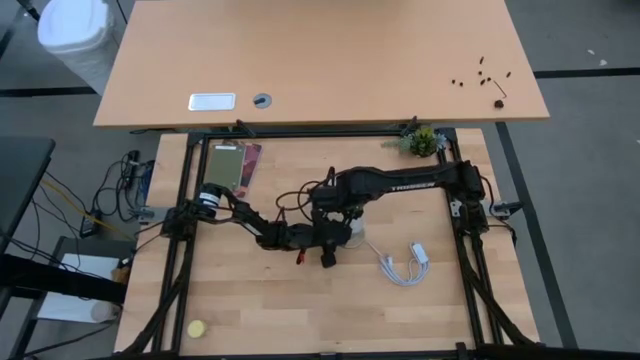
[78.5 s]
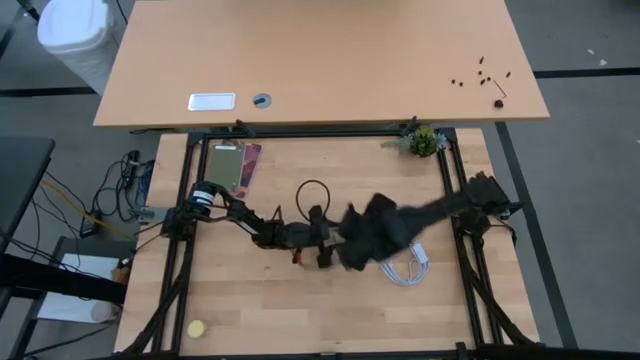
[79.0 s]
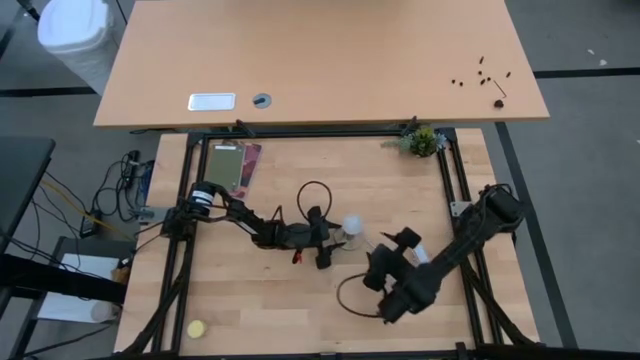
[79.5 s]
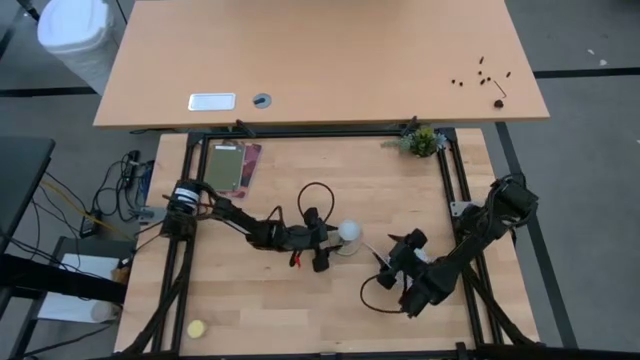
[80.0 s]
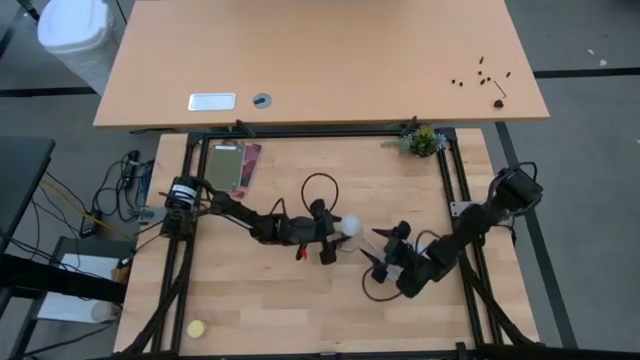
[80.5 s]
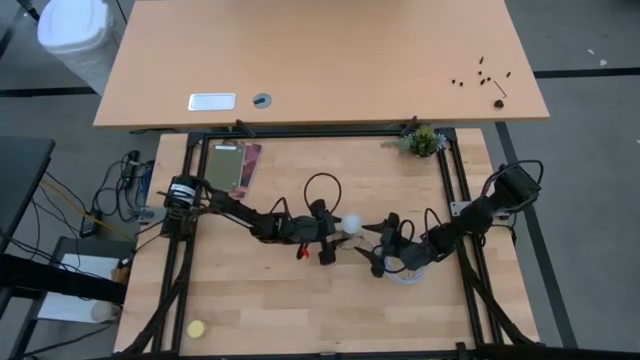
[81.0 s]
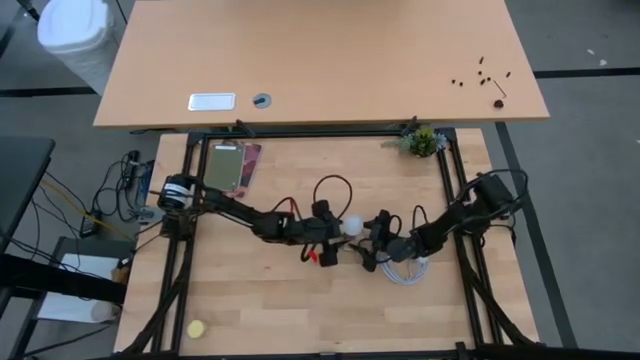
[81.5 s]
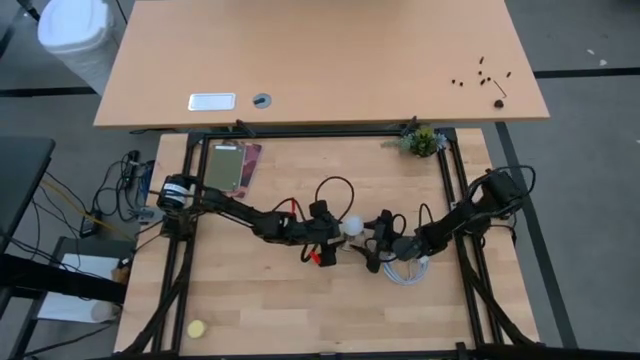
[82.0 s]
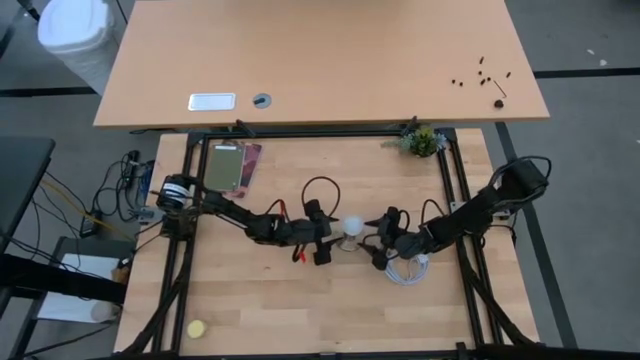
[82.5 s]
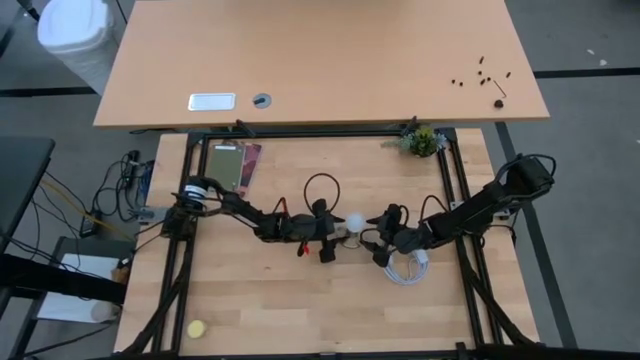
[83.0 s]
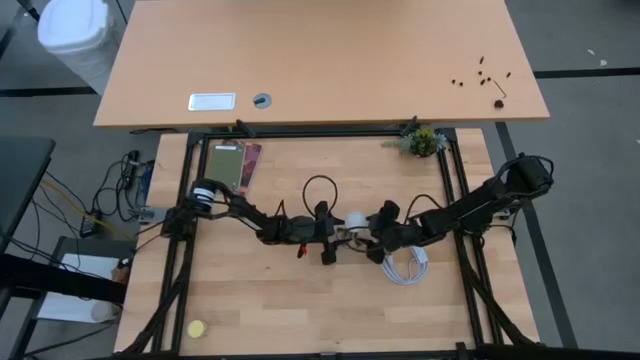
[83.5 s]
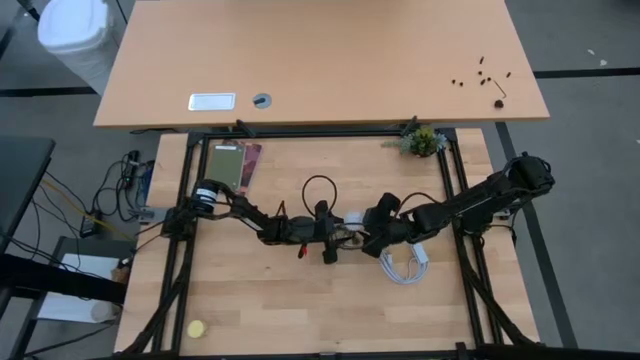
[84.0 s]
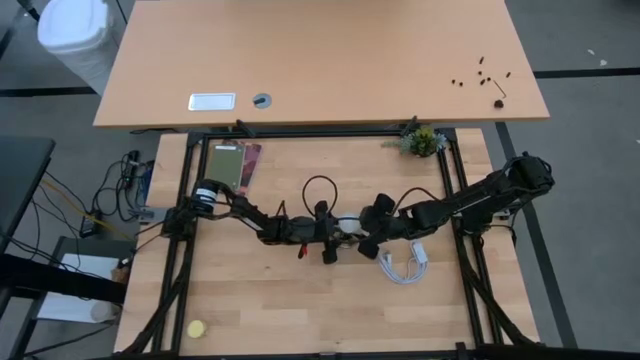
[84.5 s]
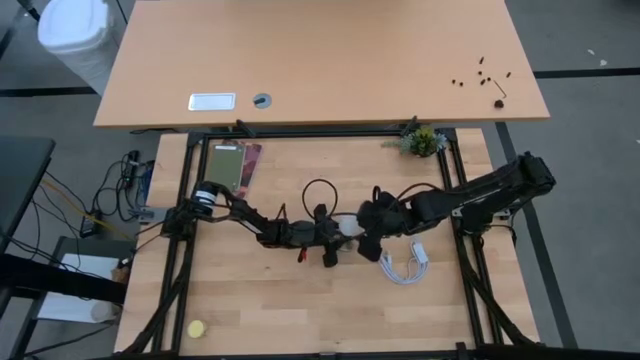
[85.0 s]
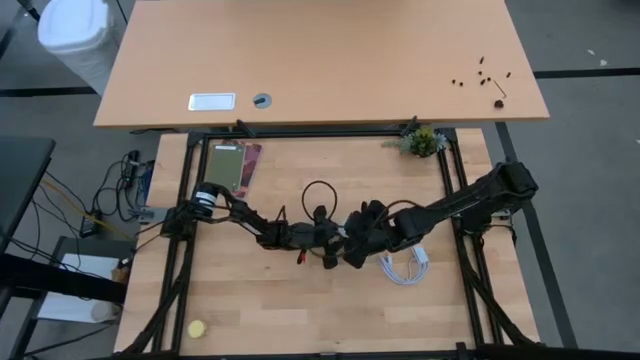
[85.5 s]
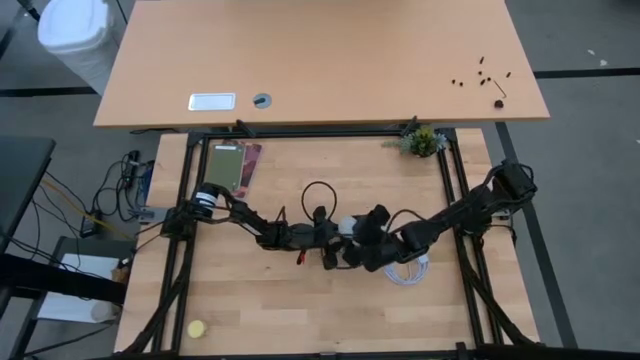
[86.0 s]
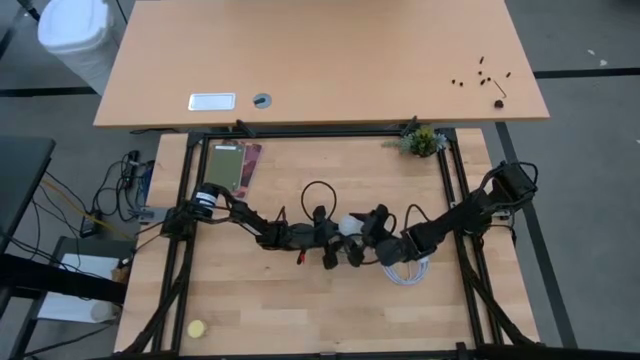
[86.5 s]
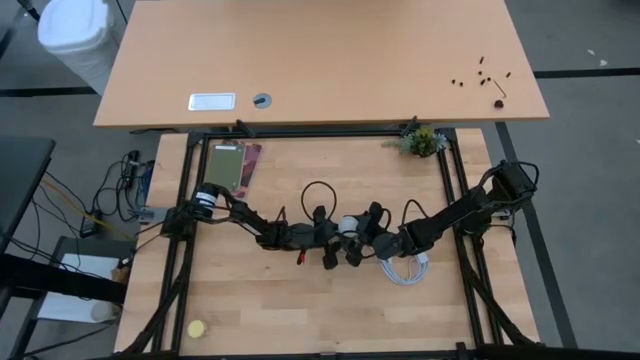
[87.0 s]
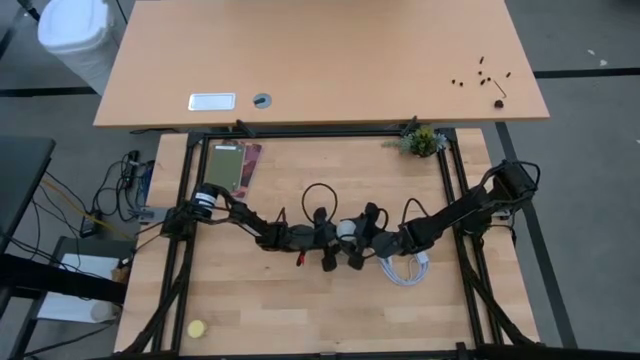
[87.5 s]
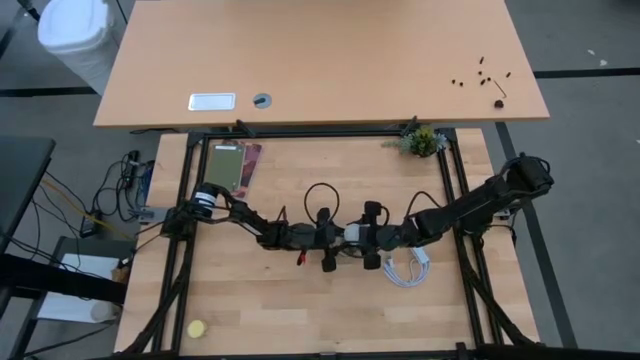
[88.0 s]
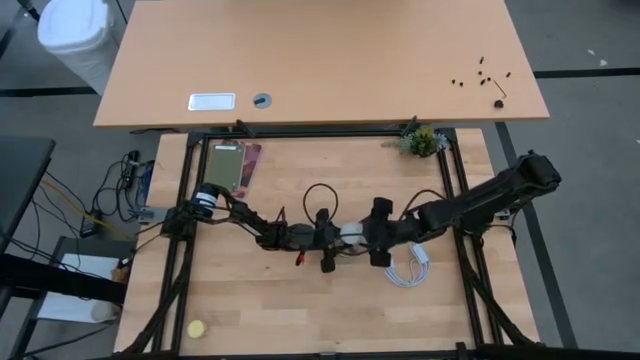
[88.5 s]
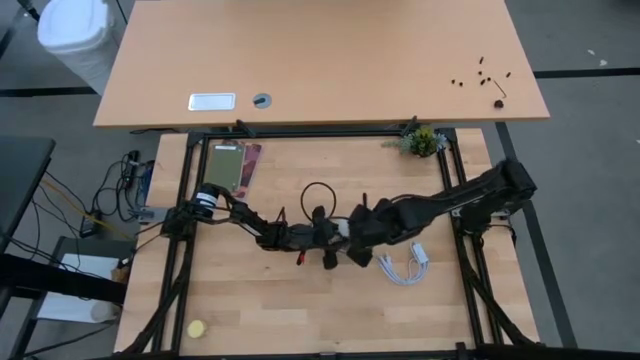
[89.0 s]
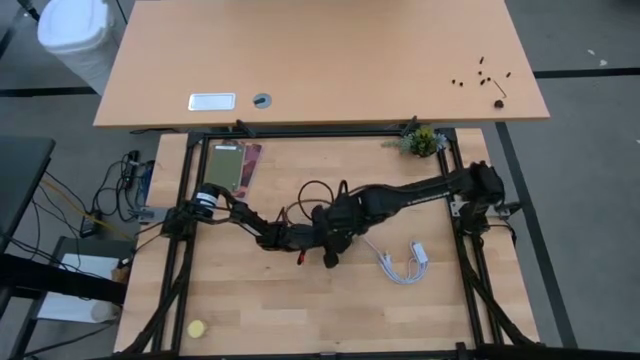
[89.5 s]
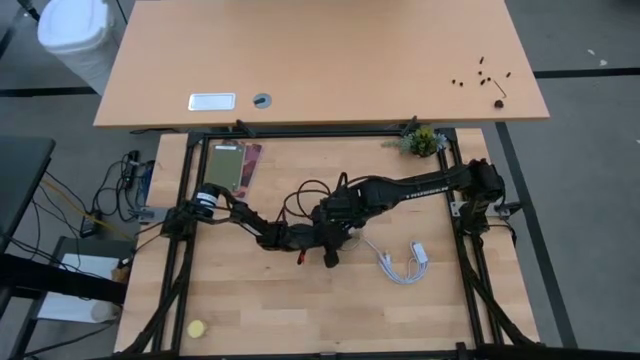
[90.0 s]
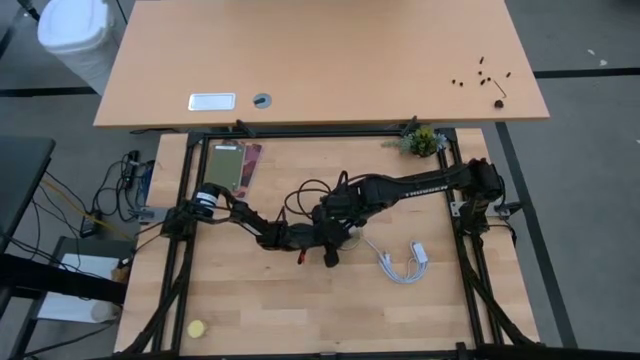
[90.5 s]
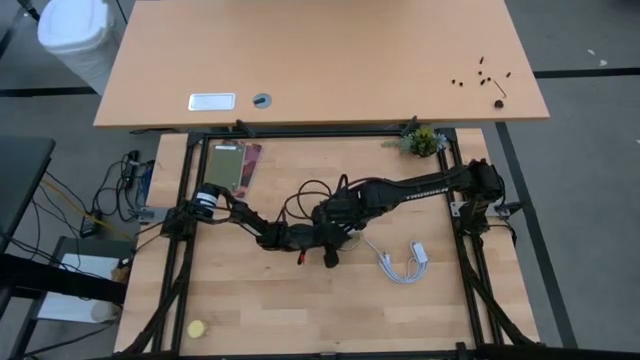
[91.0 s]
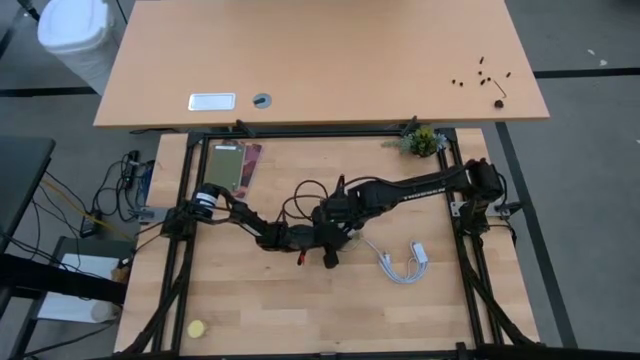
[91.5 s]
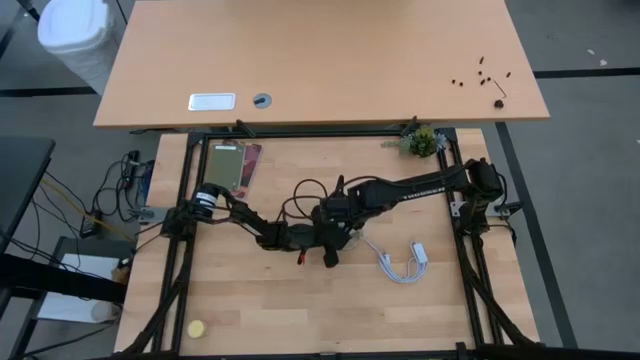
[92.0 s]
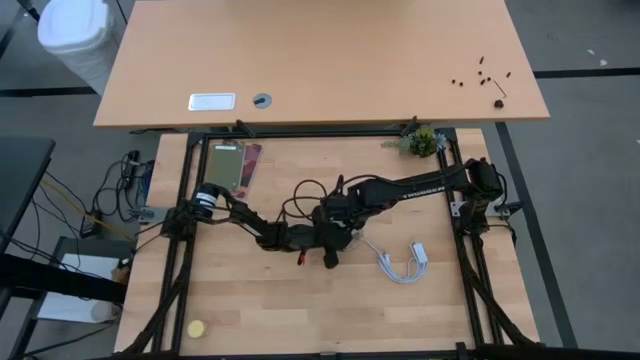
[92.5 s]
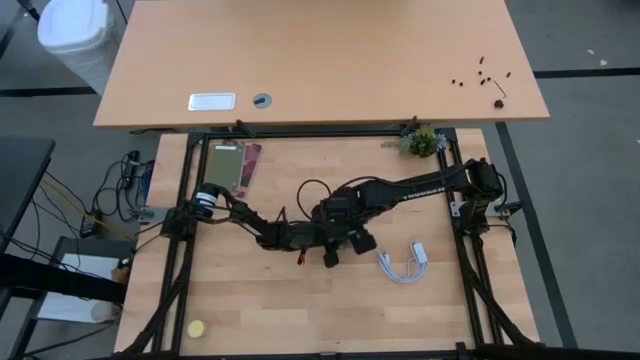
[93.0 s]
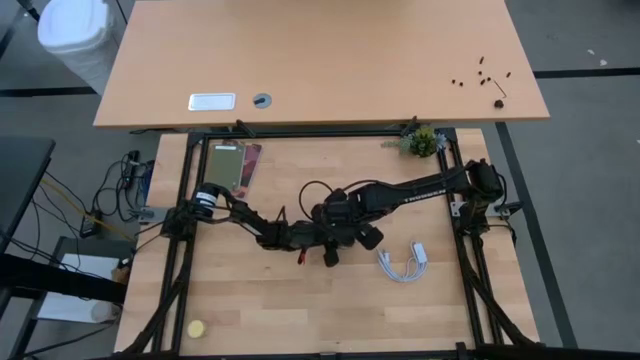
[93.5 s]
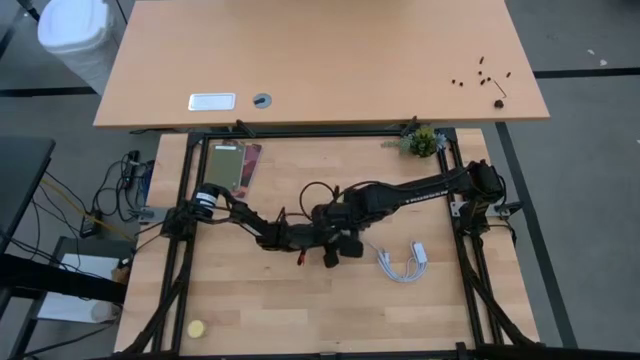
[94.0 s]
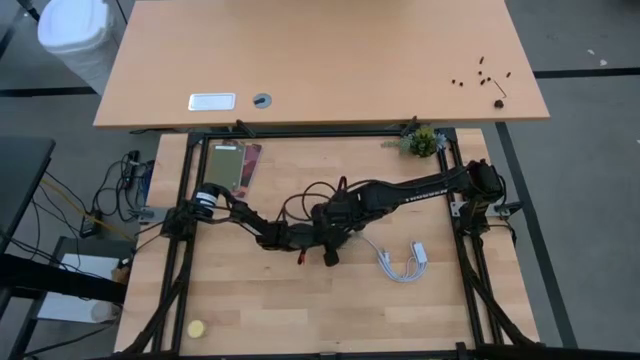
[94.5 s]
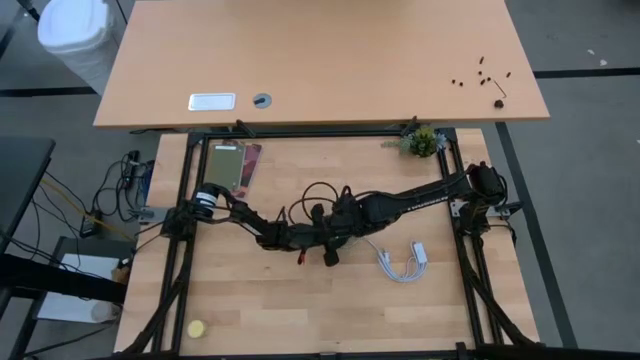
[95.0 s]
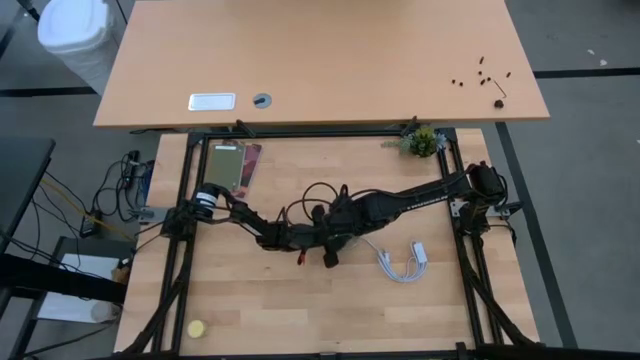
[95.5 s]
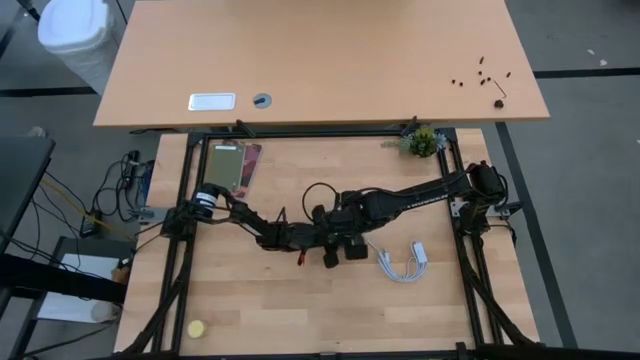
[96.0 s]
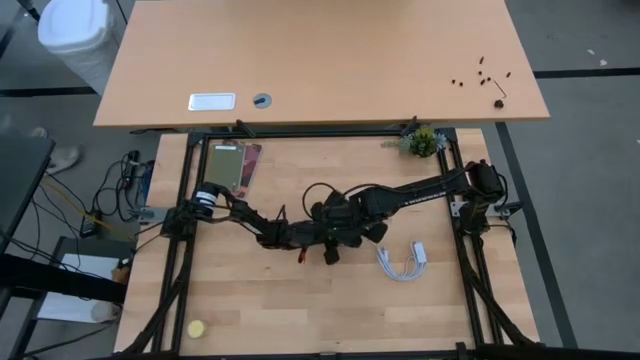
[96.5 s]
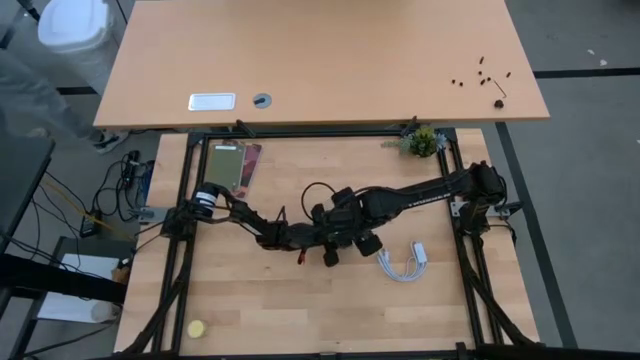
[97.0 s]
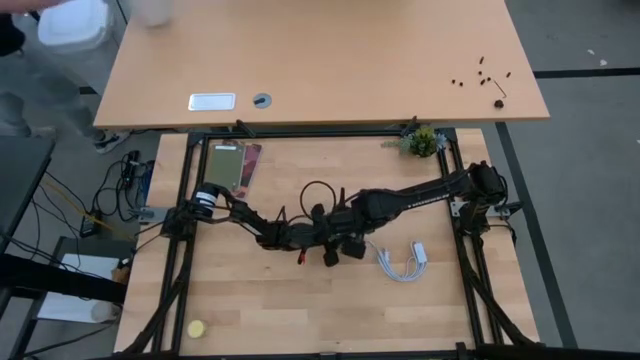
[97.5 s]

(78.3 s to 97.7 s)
Task: Screw lightbulb
Remove the white lightbulb from the desk lamp

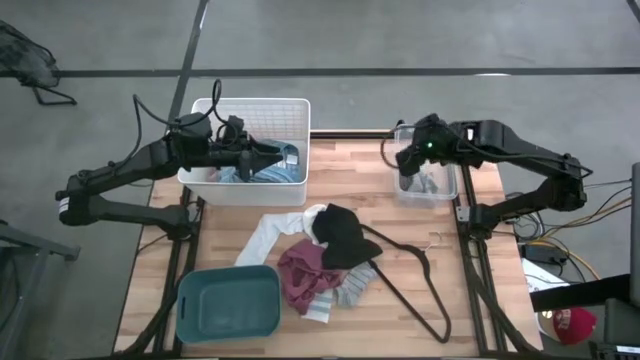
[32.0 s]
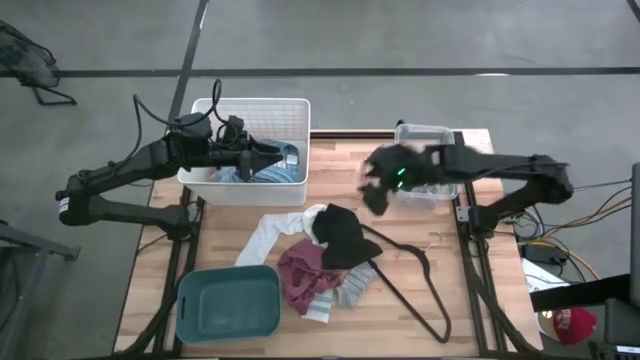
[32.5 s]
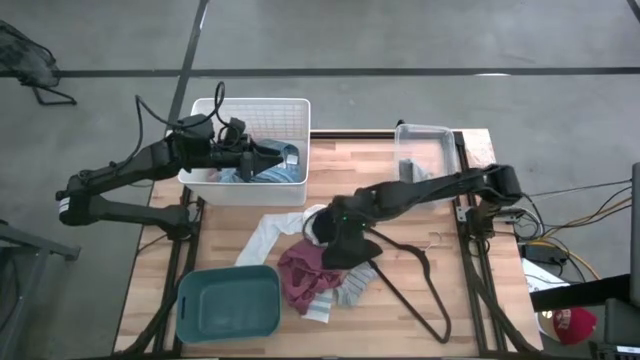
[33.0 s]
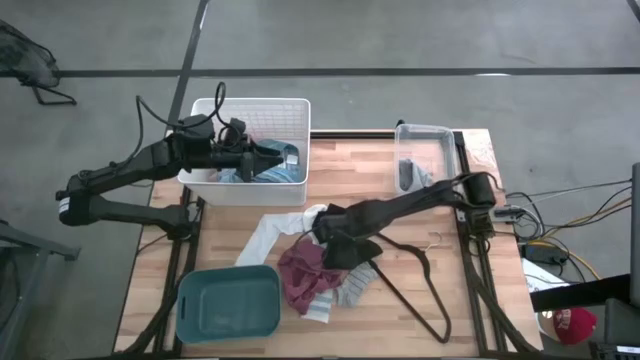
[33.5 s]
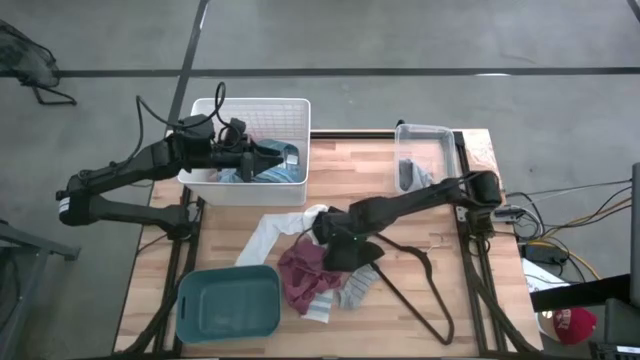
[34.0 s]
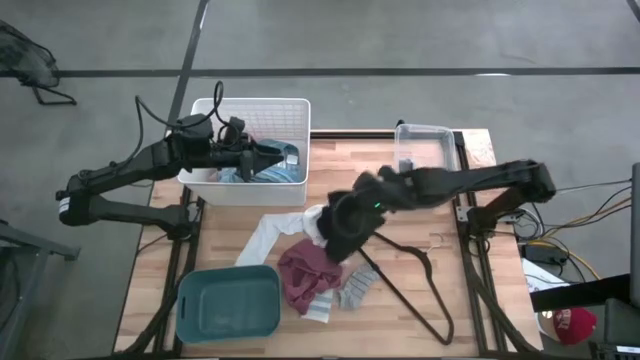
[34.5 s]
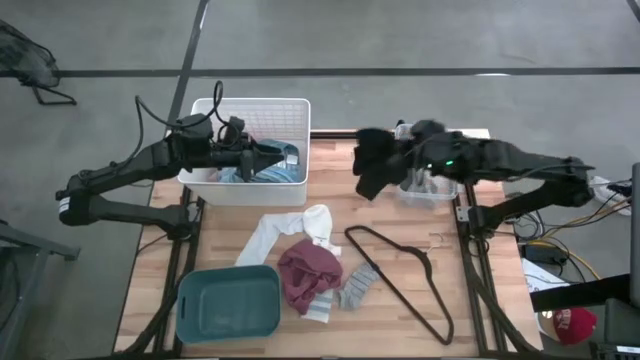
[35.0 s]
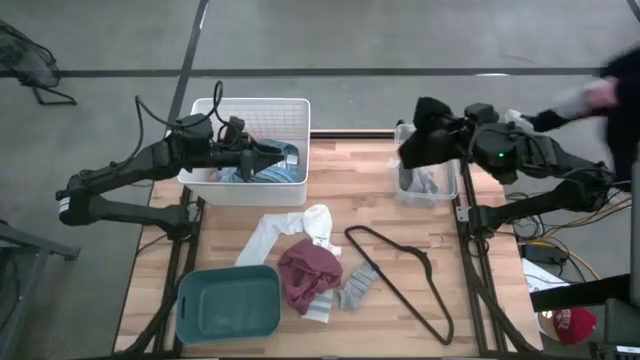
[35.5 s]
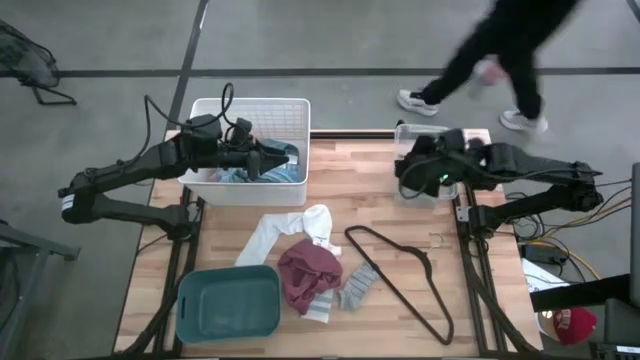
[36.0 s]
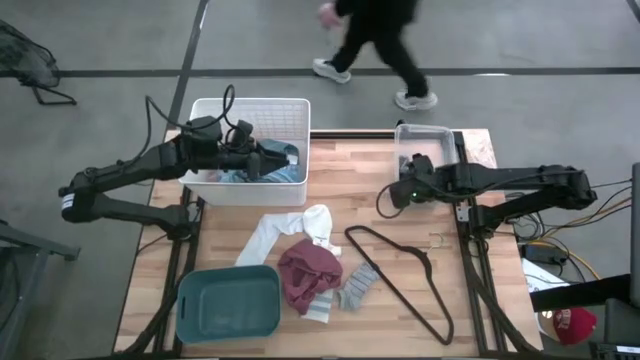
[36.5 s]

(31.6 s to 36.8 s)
Task: Pick & Place Cloths
Put the black boxers into the transparent bin
